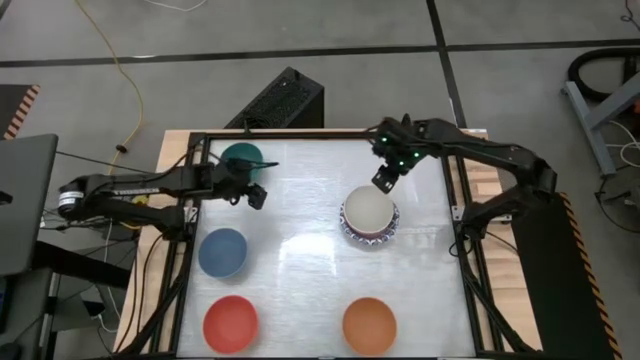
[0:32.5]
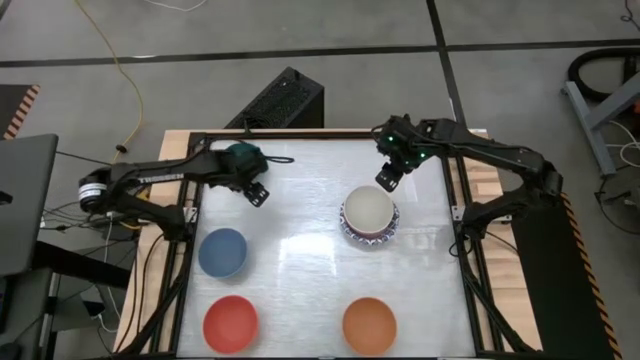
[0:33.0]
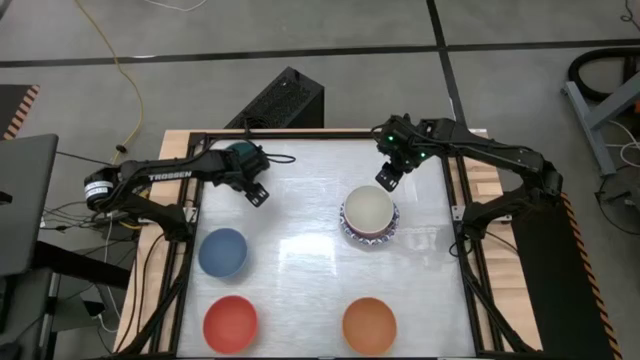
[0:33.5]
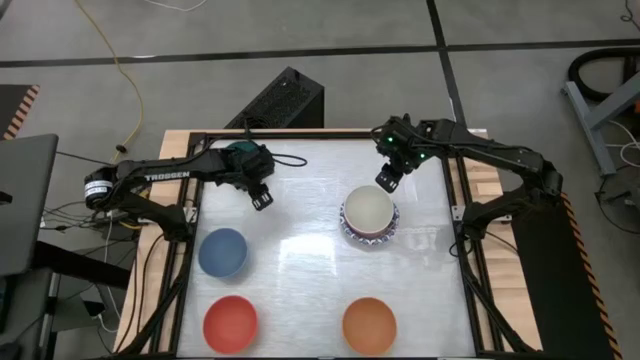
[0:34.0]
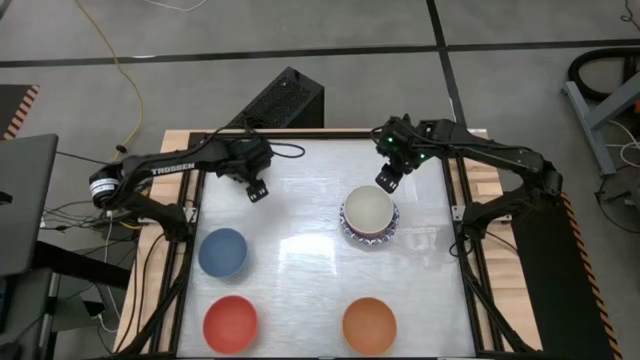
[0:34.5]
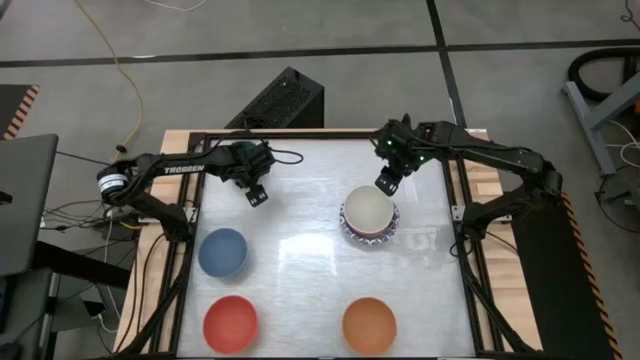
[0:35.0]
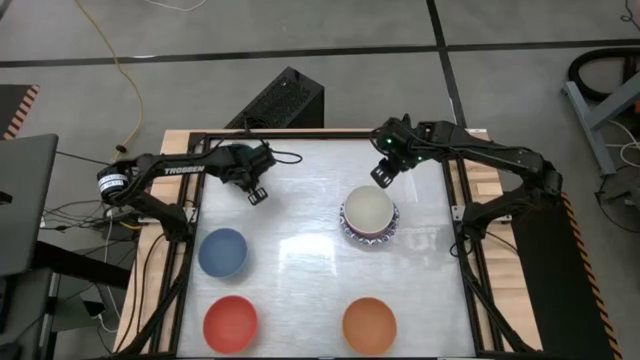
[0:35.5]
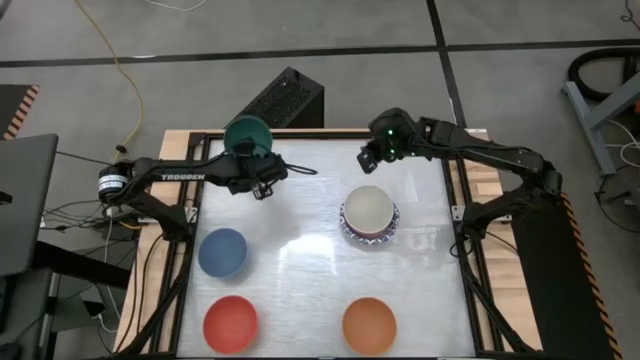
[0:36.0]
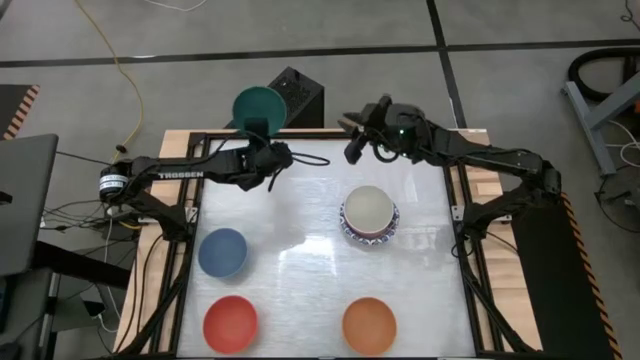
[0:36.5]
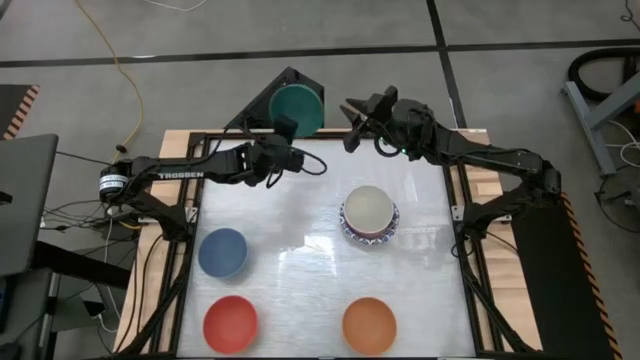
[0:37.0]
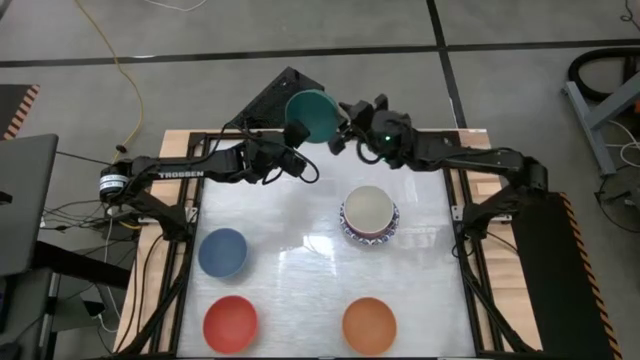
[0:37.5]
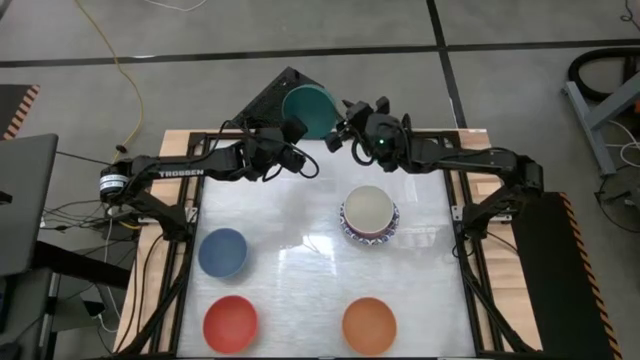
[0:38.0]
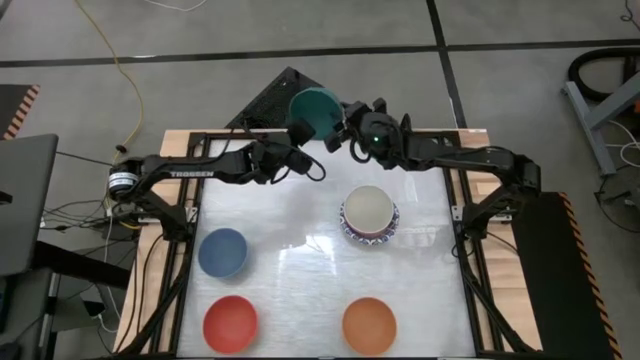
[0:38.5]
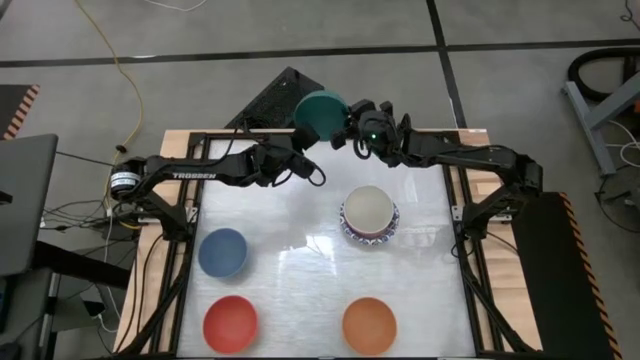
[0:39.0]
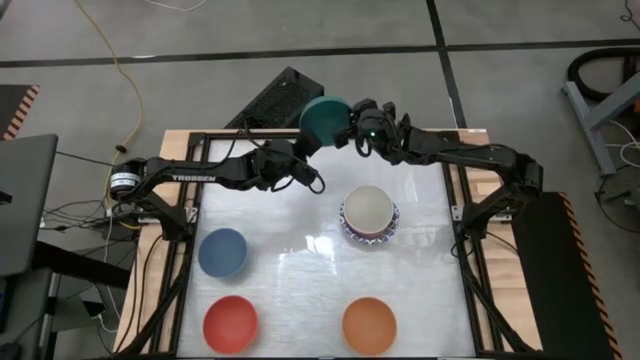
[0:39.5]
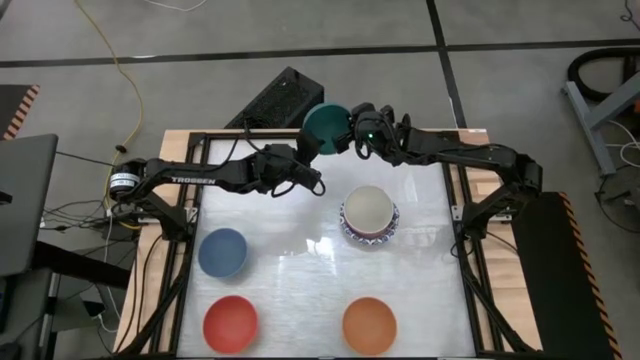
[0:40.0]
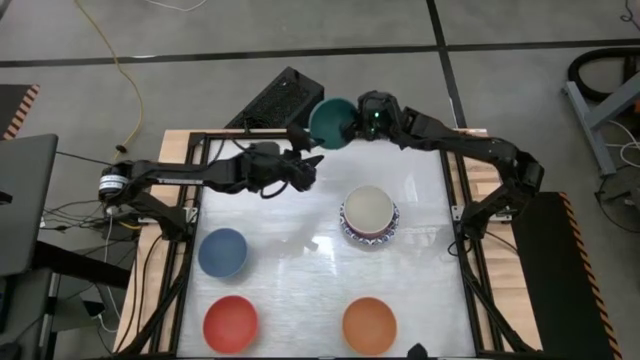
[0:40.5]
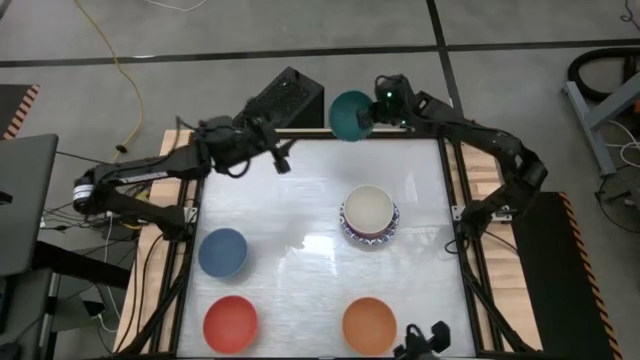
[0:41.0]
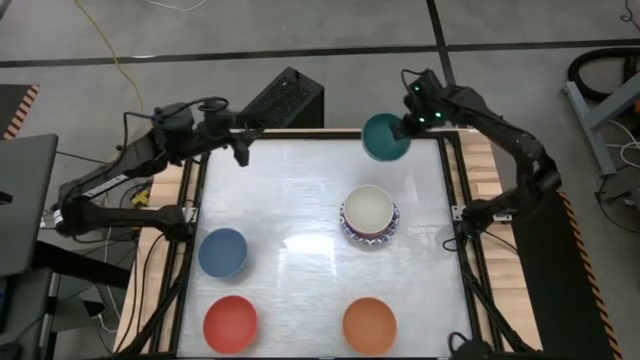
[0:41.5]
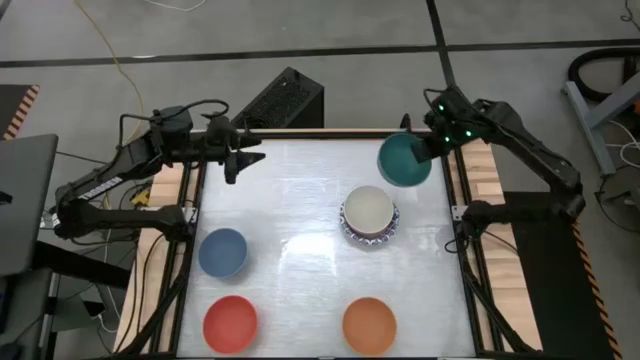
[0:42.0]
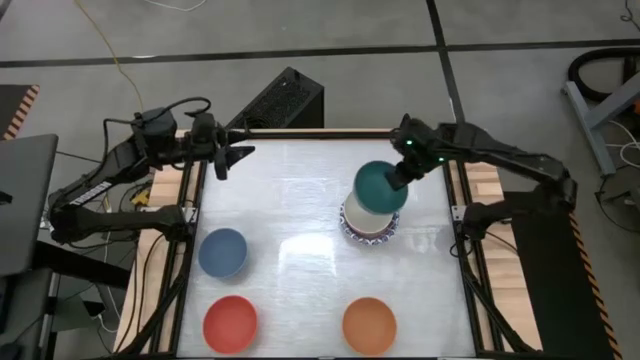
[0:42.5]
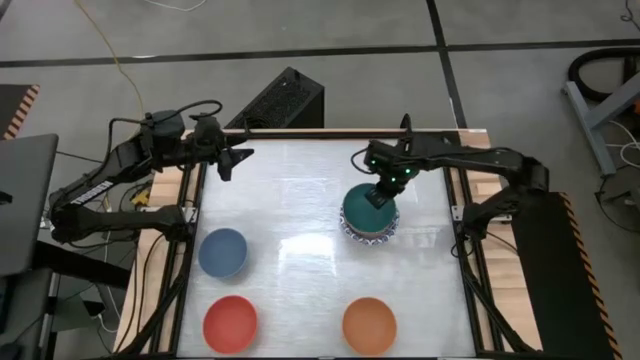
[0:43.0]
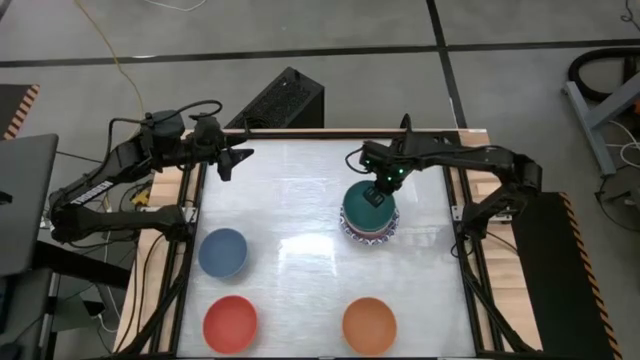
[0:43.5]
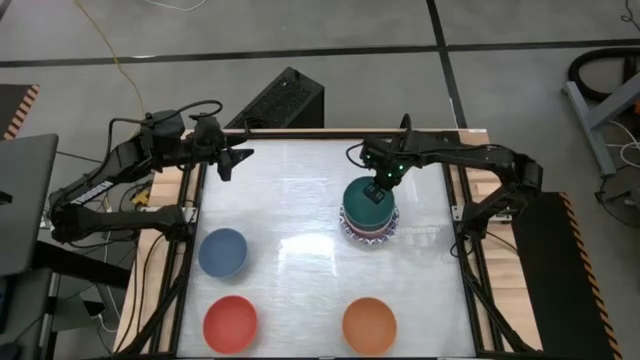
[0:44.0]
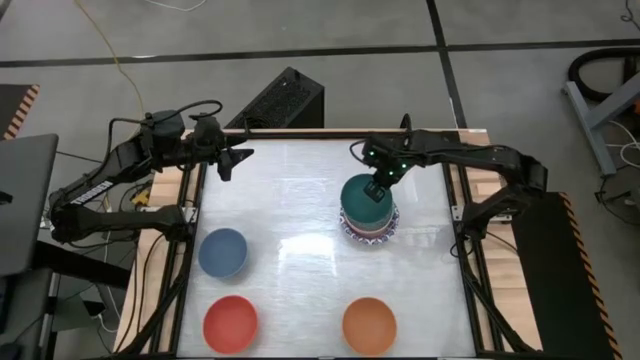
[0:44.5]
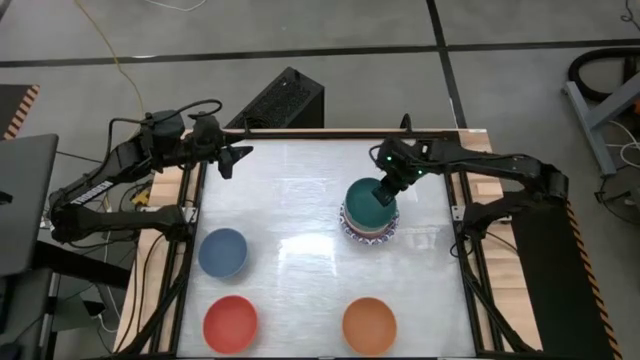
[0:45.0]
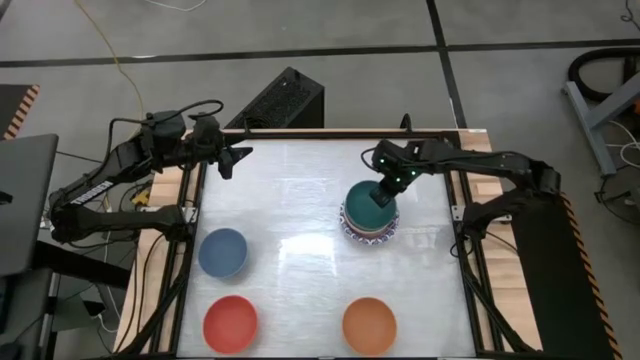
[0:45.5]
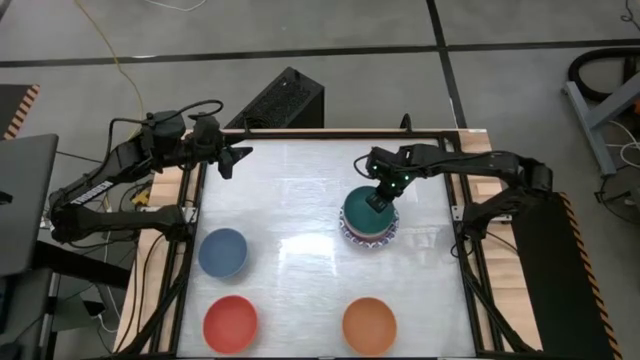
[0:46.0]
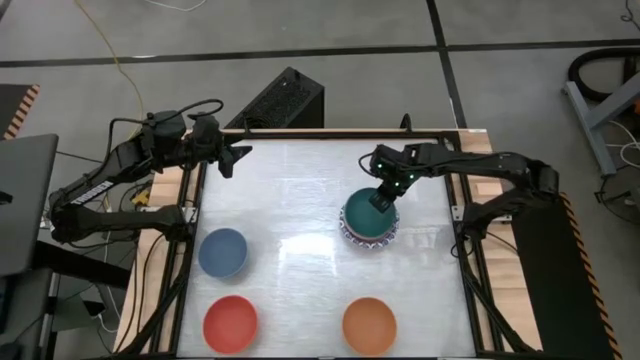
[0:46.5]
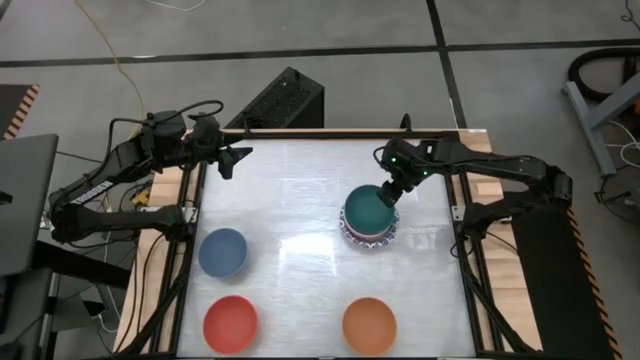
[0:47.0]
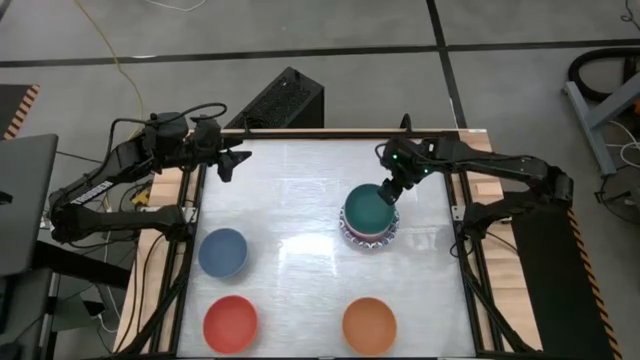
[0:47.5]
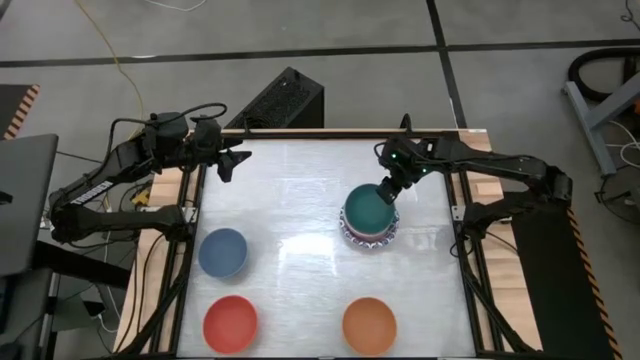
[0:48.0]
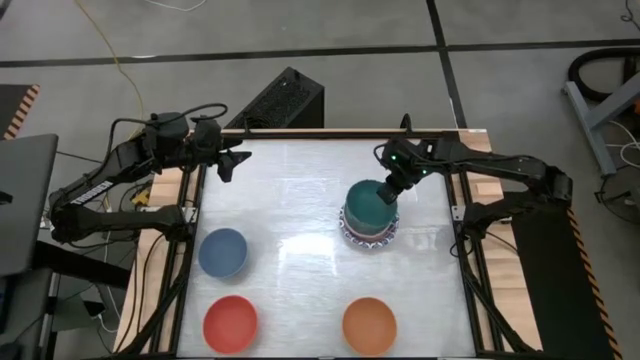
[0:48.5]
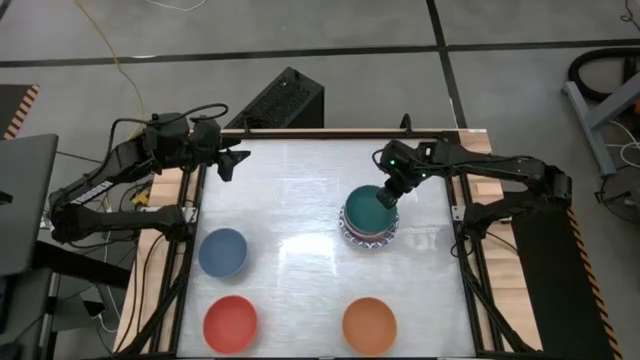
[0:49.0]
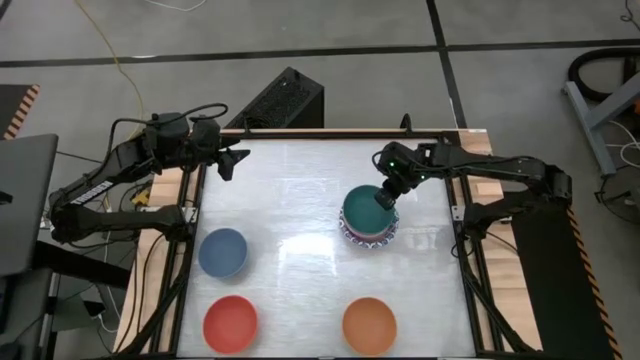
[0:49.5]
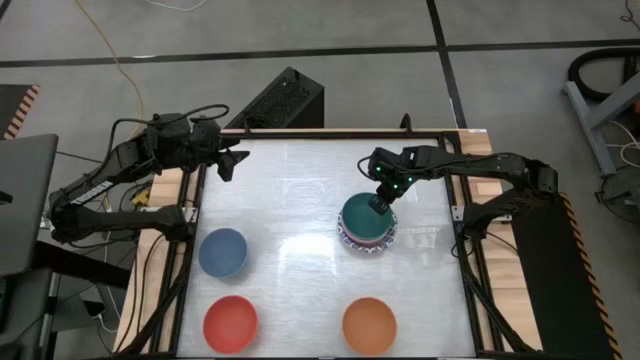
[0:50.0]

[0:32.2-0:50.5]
Stack the green bowl on top of the gray bowl
